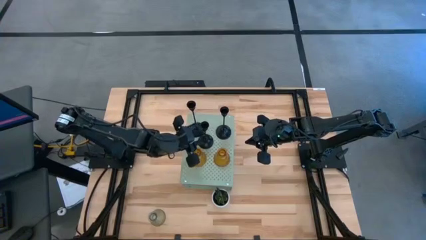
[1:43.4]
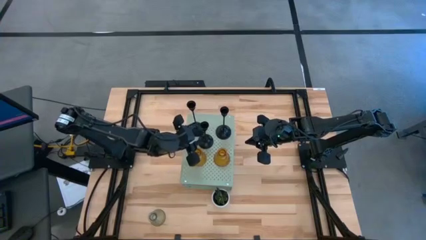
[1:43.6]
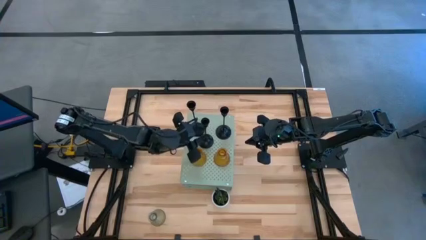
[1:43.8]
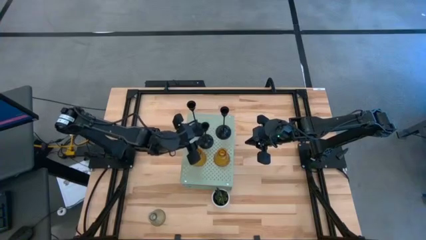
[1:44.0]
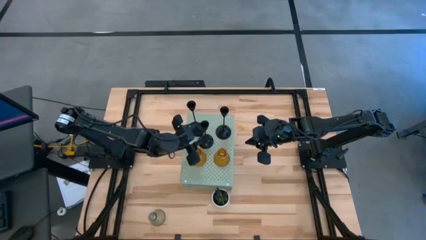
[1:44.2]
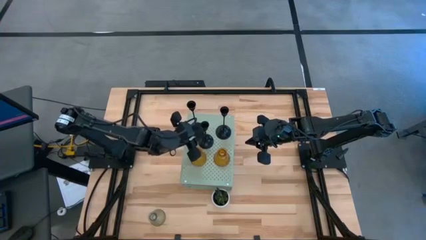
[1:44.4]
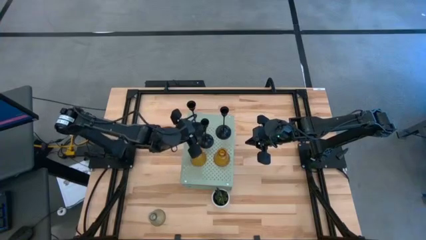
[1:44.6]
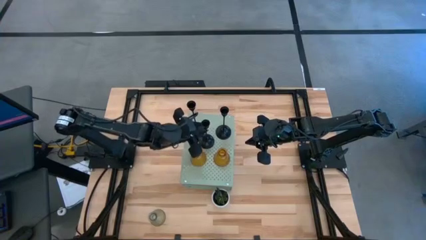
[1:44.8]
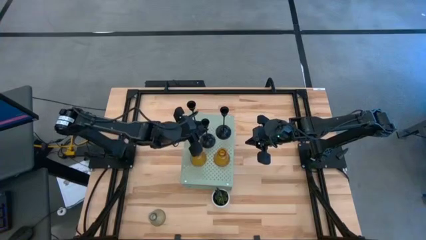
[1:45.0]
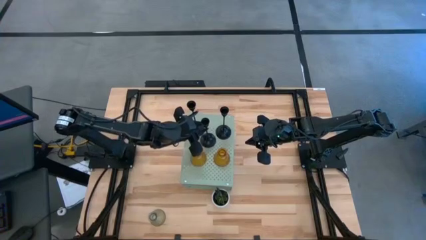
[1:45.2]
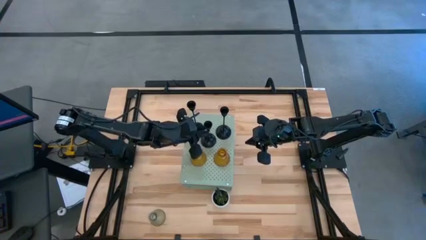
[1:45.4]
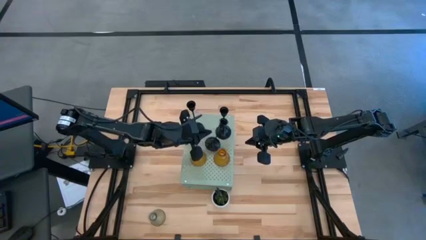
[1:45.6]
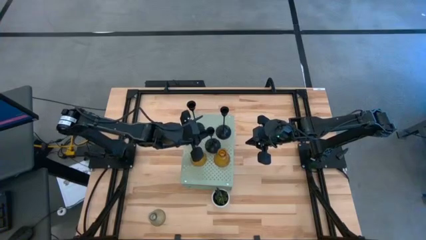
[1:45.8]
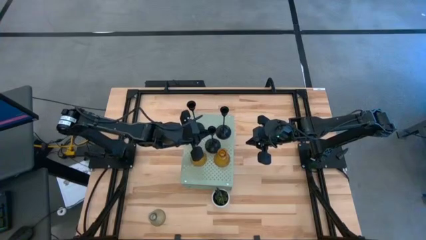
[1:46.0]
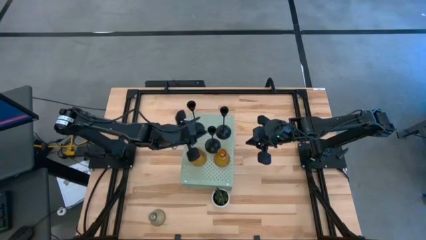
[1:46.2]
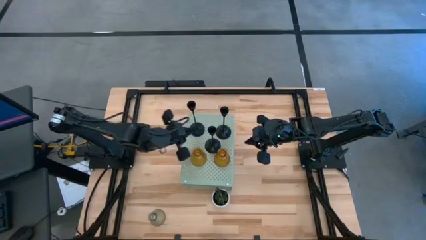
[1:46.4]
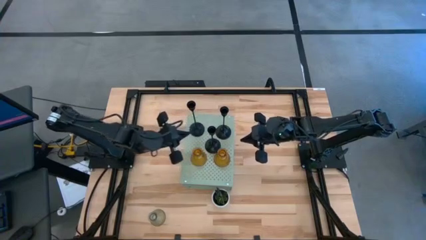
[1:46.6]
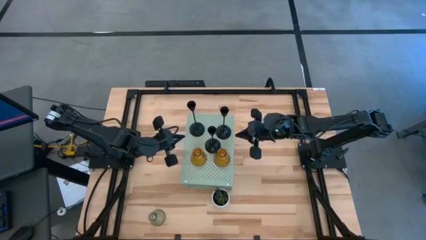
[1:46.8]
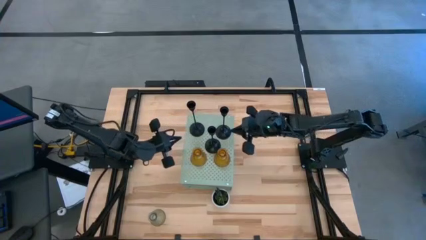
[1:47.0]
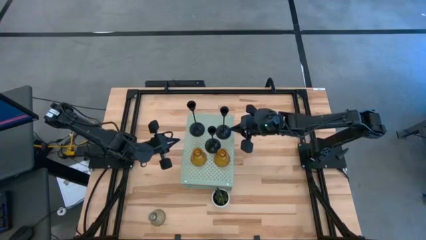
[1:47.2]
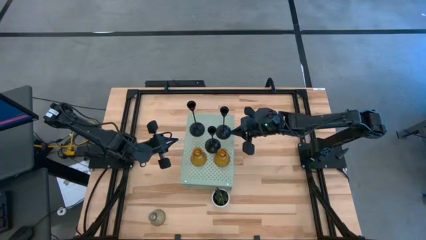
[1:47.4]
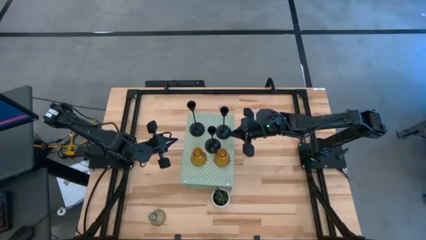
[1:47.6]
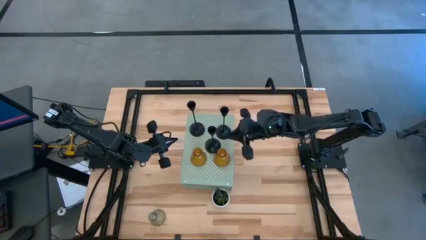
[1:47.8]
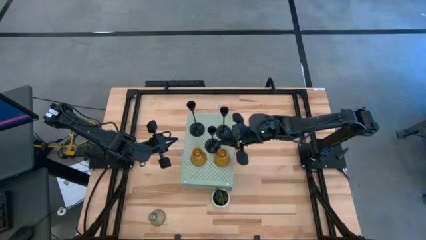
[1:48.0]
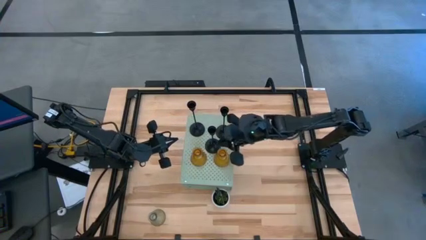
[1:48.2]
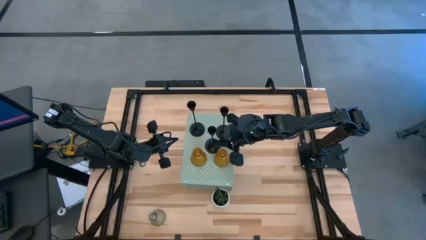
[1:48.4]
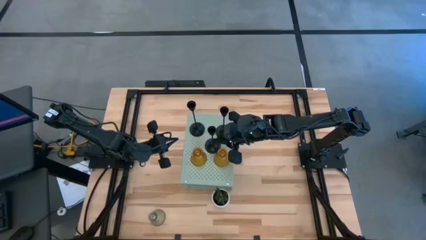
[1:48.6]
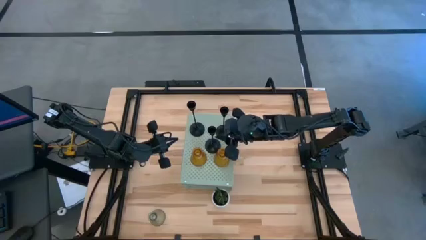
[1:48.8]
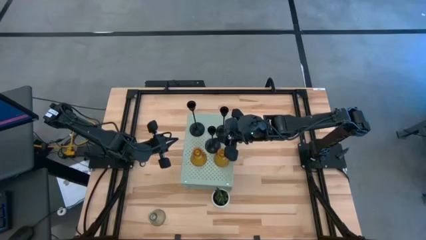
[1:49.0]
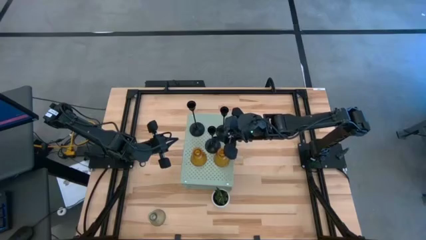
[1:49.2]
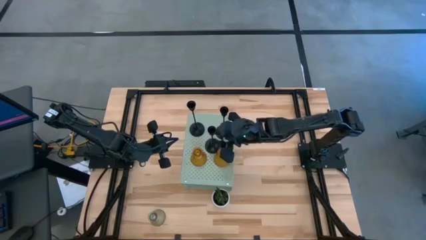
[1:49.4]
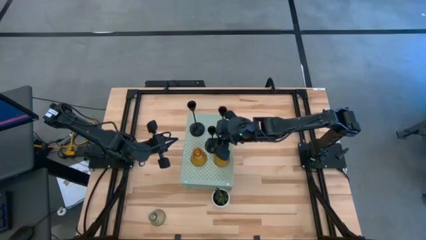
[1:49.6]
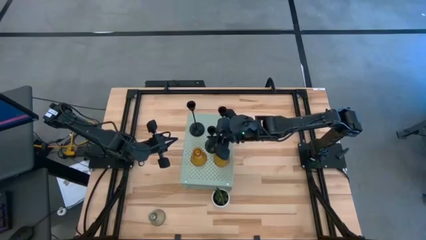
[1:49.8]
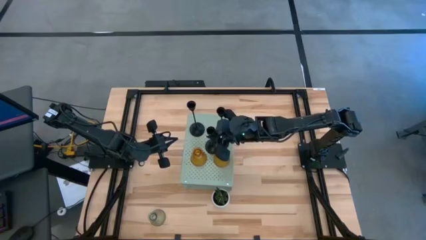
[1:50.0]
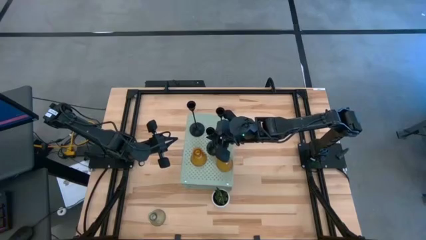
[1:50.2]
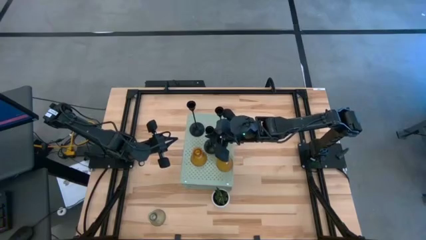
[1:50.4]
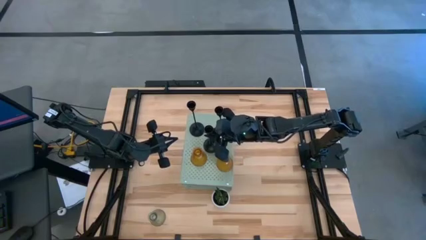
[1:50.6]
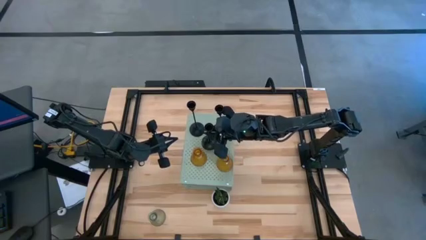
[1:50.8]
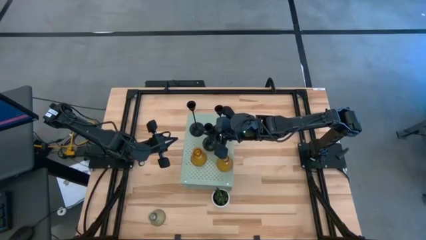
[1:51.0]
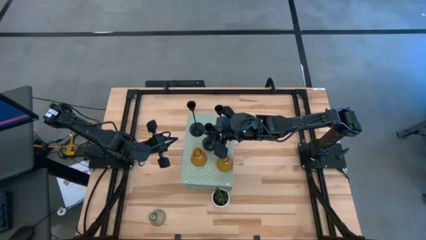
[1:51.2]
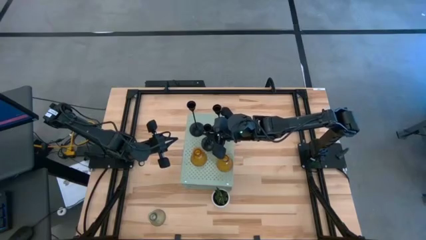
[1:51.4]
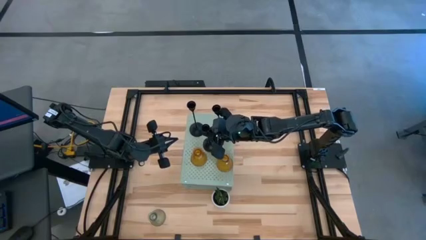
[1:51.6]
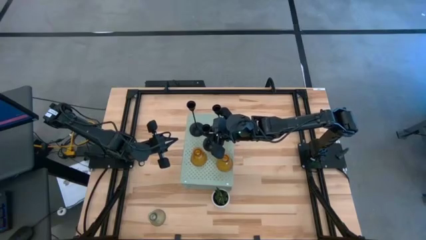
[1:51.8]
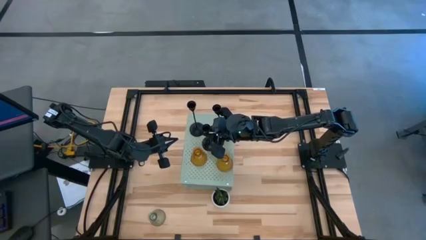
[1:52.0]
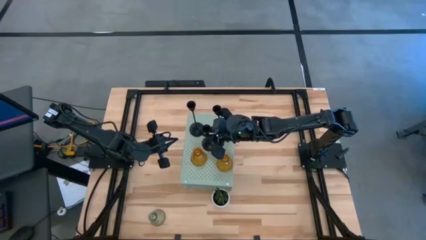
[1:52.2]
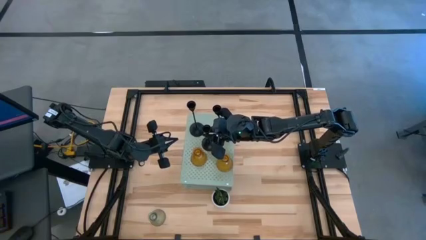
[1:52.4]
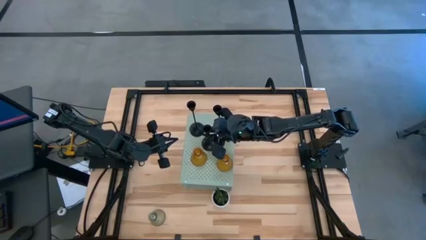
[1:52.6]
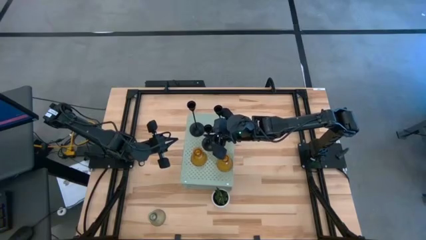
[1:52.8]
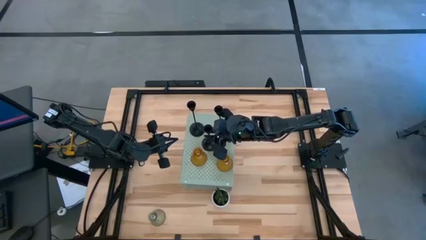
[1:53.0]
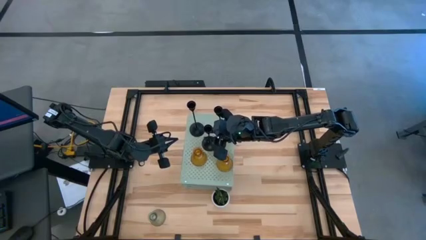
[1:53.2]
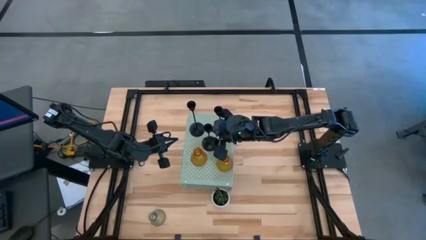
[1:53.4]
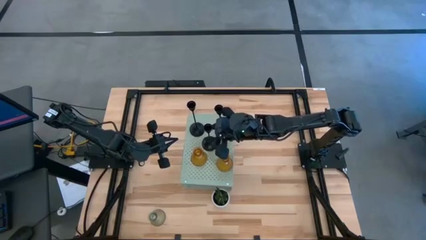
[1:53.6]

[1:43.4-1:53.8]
Task: Pick & Place candle stick holders
Adjust the black candle holders on the shelf

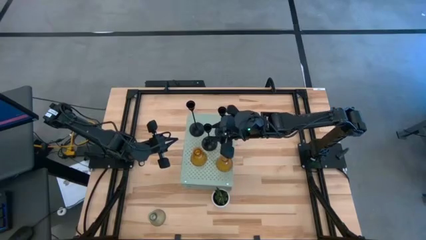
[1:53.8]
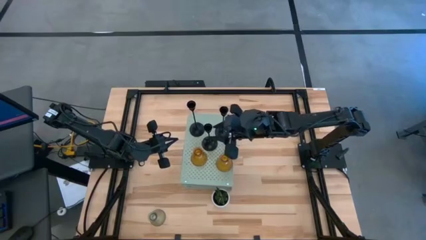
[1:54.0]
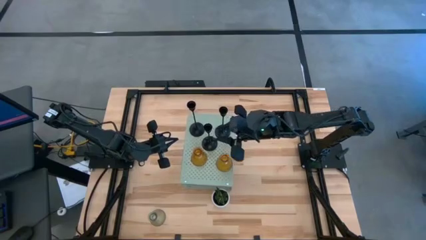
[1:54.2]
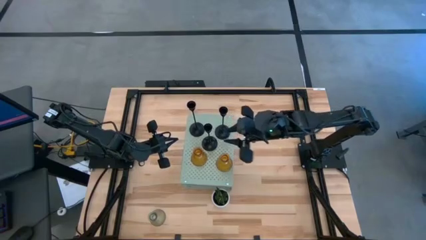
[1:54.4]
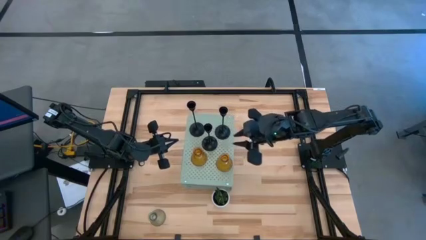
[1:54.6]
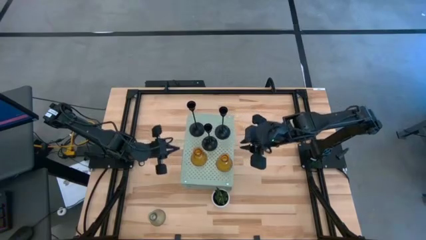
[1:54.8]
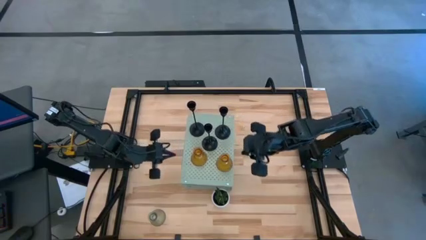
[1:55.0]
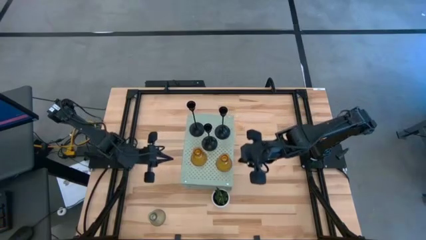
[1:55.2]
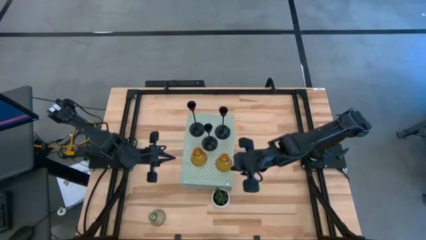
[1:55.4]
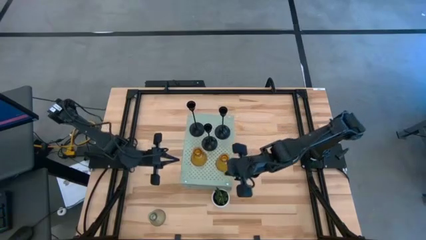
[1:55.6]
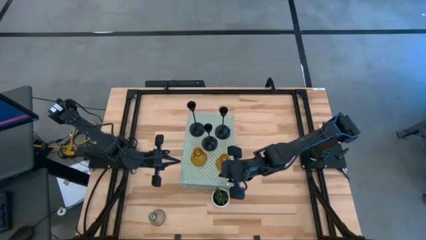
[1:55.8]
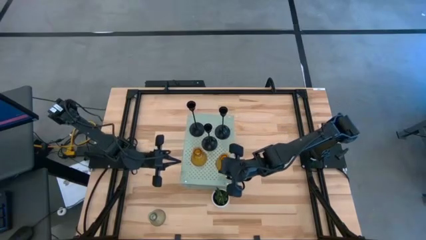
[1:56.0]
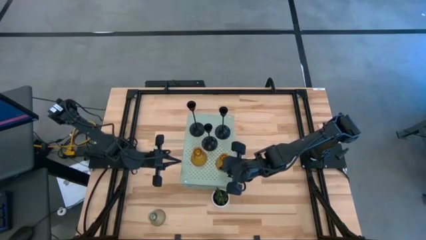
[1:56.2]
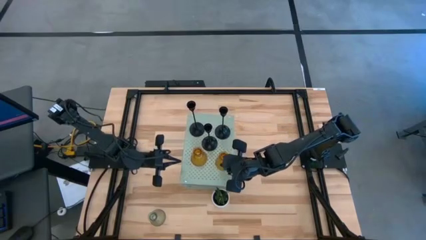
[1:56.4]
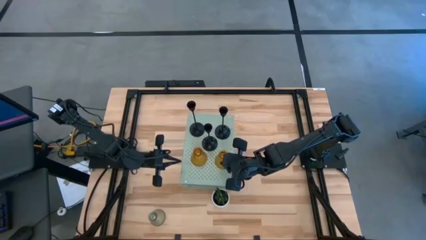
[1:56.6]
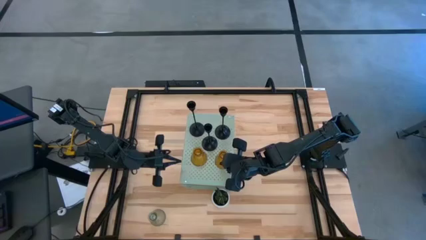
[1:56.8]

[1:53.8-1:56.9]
Adjust the left yellow candle holder

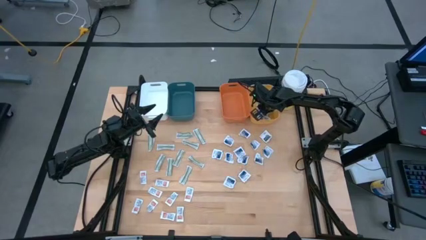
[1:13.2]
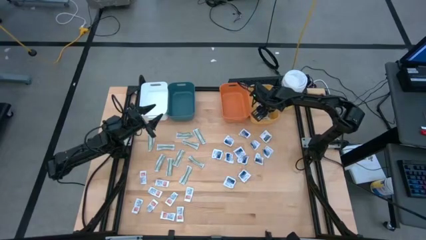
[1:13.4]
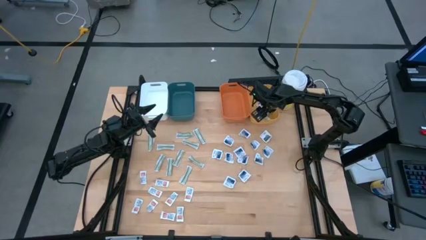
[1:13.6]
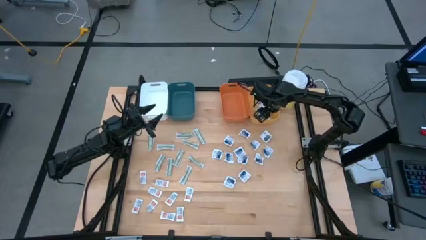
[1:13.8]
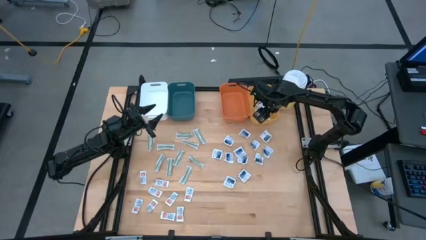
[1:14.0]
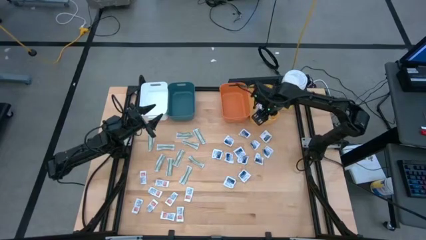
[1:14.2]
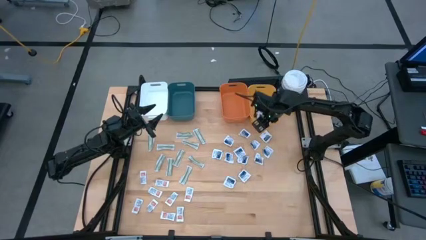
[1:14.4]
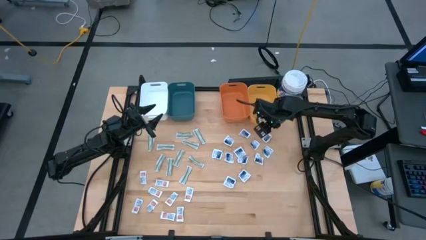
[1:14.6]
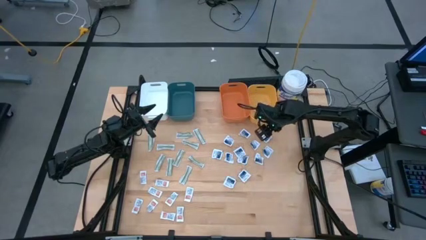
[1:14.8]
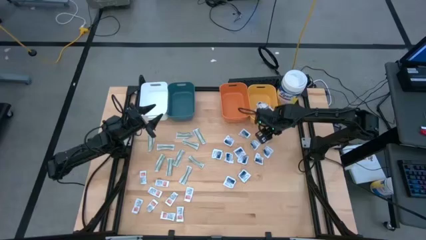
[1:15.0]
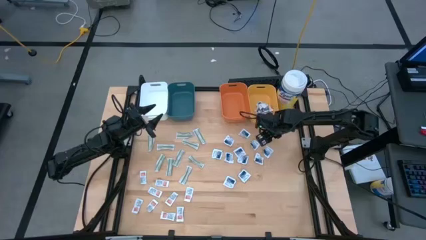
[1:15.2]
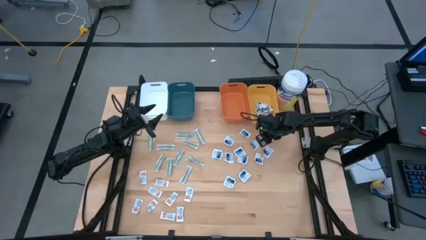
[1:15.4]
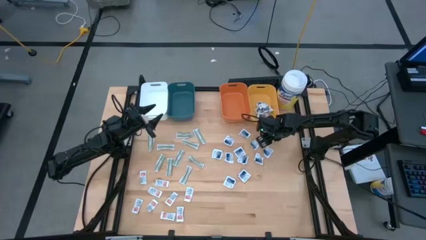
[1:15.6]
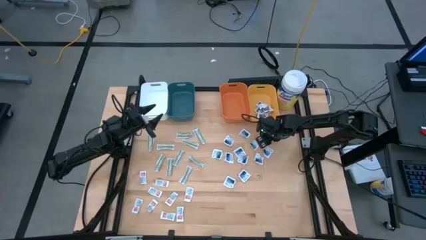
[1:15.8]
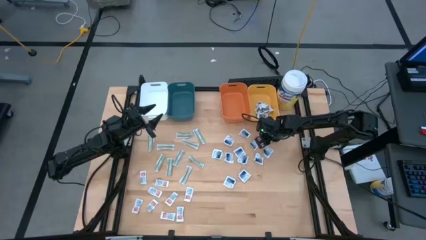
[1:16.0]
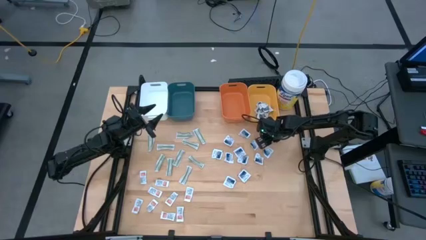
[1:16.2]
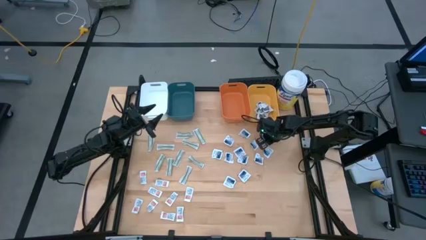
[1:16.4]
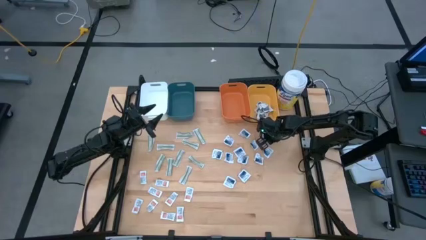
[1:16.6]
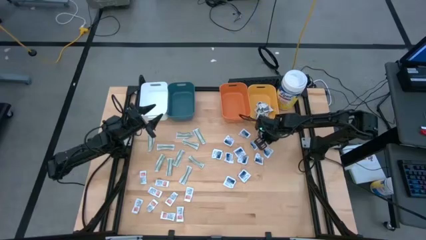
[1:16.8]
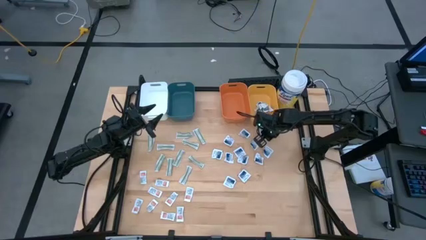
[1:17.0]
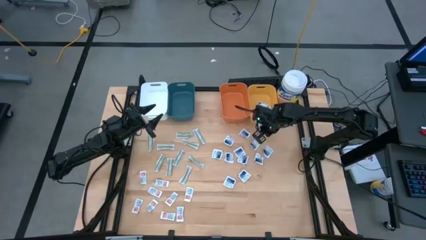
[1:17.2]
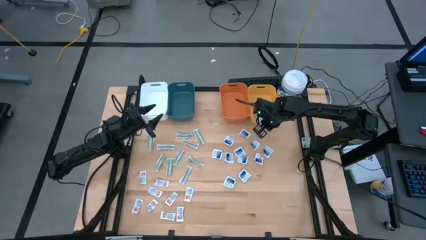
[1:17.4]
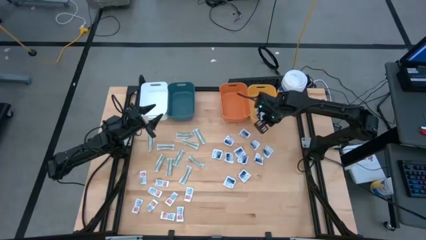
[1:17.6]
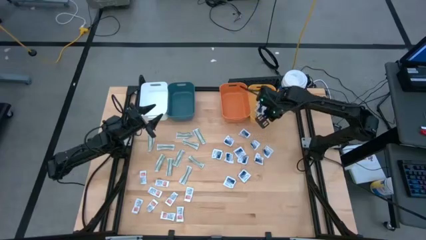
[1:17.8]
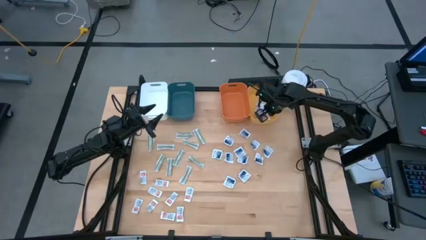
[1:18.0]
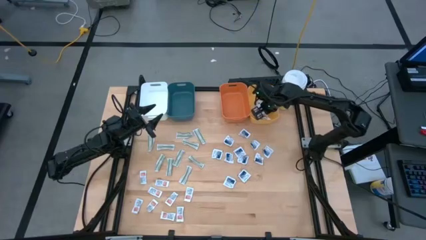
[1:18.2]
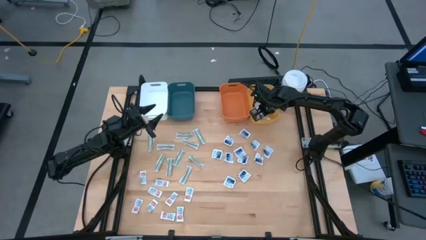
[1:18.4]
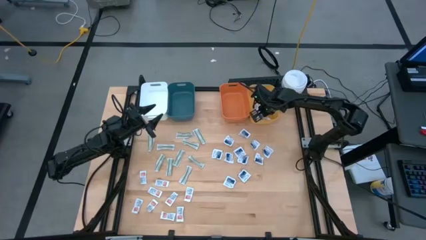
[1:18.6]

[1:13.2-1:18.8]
Task: Pick & Place First Aid Supplies
Put the towelette pack into the yellow bin
